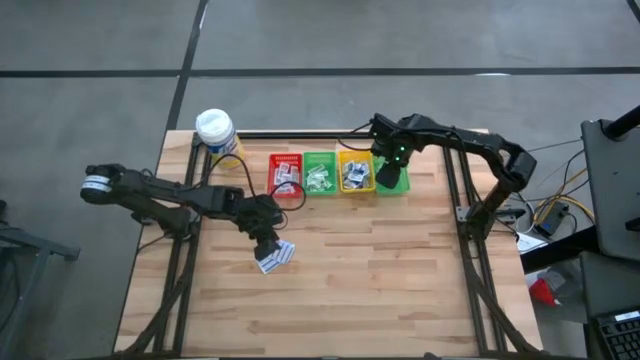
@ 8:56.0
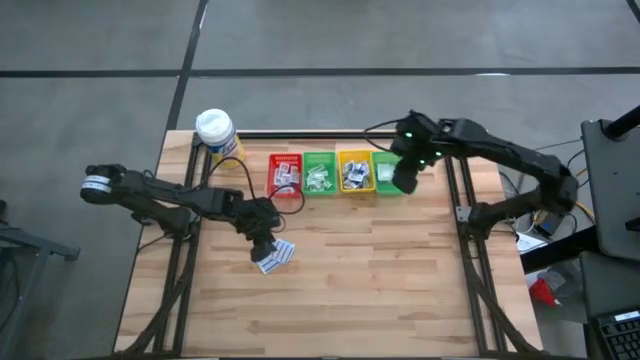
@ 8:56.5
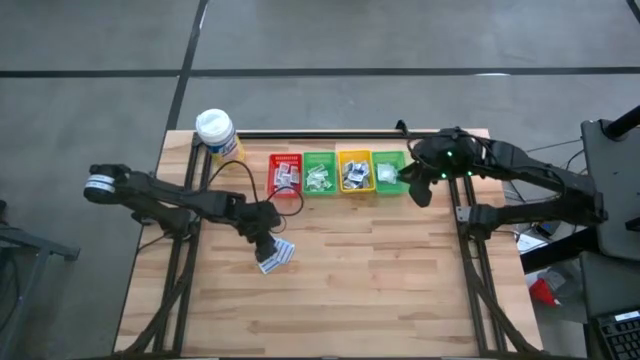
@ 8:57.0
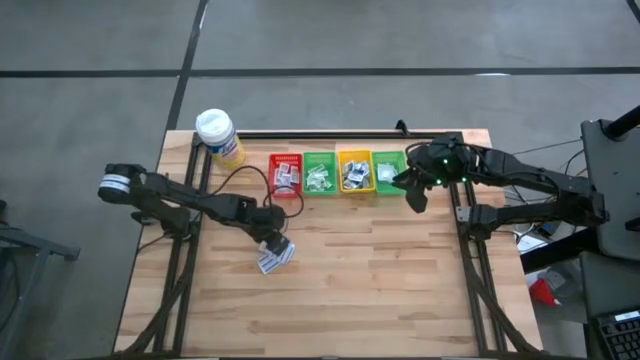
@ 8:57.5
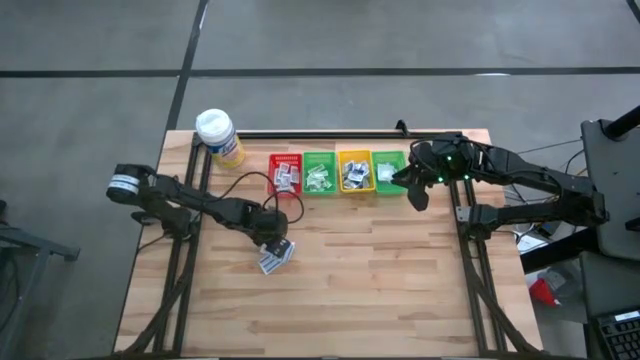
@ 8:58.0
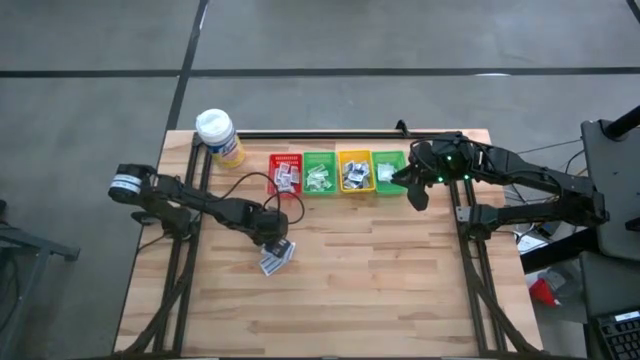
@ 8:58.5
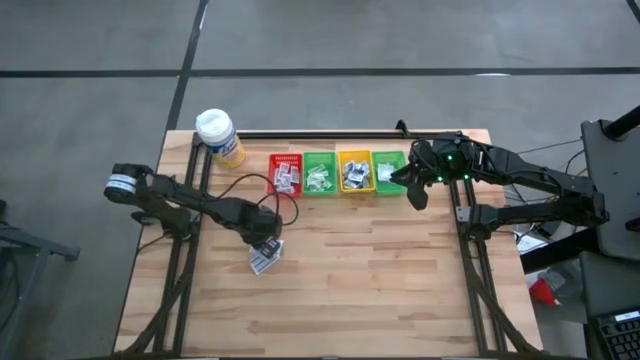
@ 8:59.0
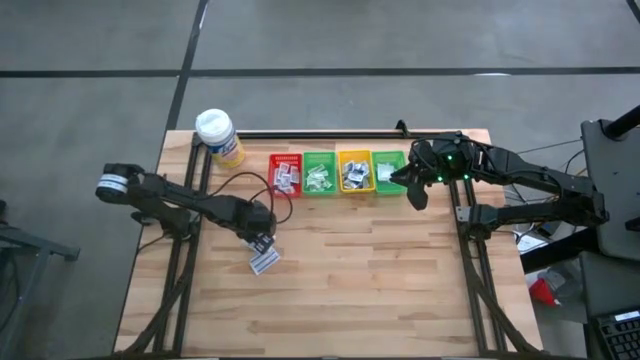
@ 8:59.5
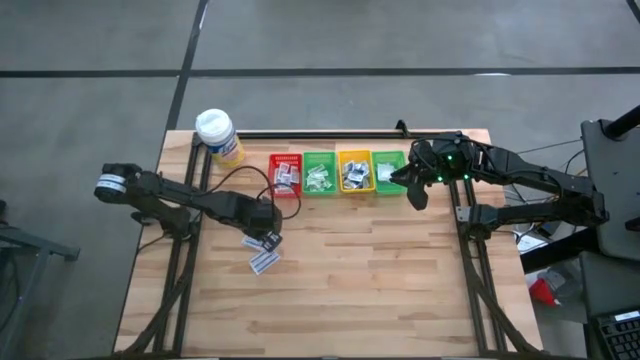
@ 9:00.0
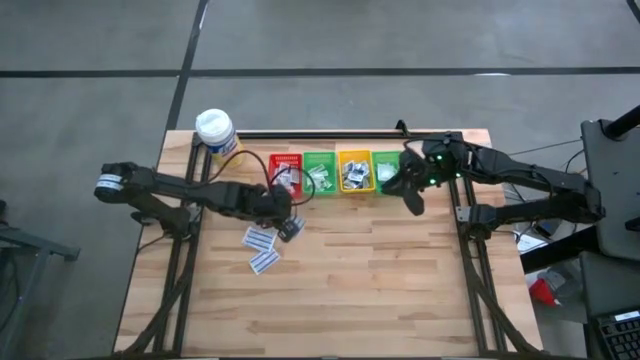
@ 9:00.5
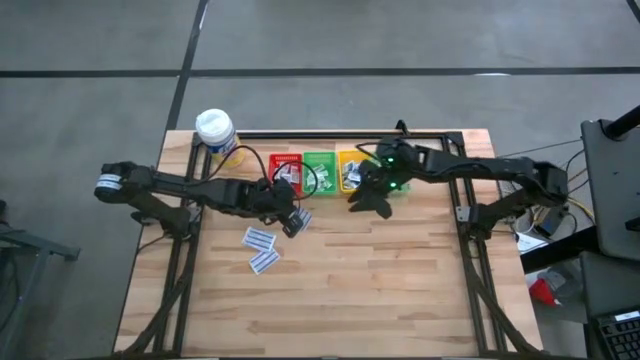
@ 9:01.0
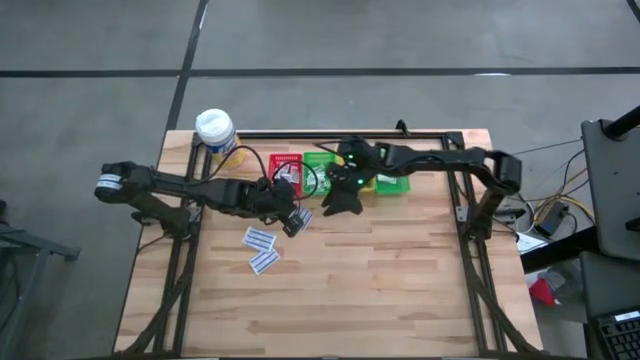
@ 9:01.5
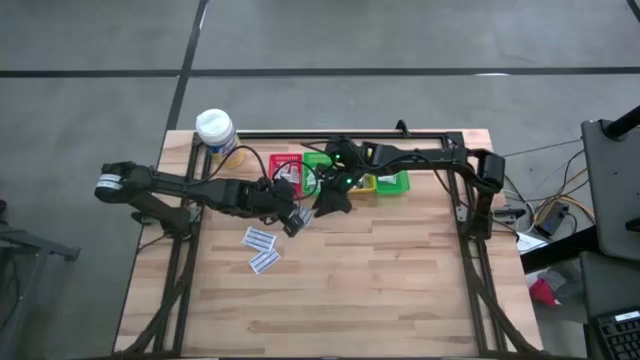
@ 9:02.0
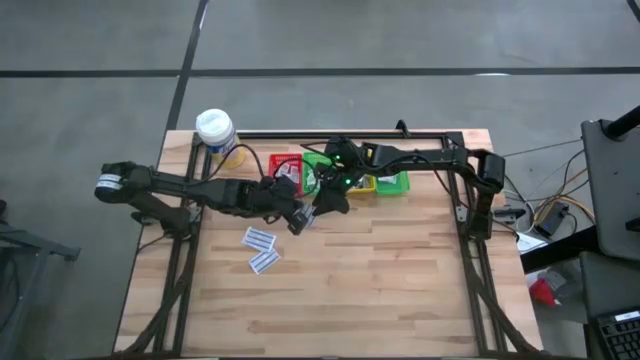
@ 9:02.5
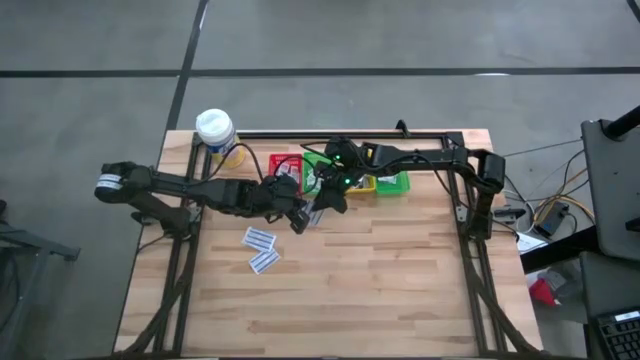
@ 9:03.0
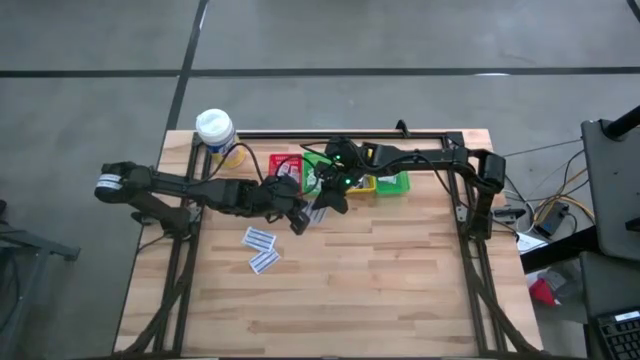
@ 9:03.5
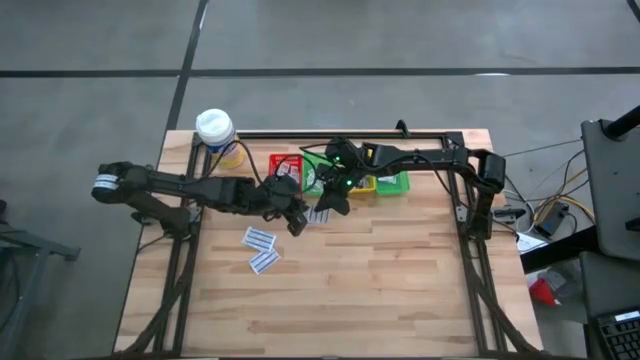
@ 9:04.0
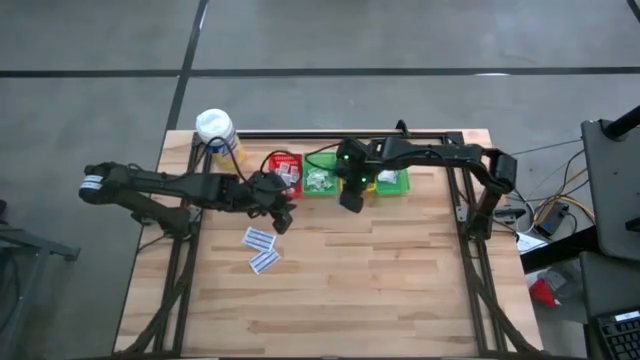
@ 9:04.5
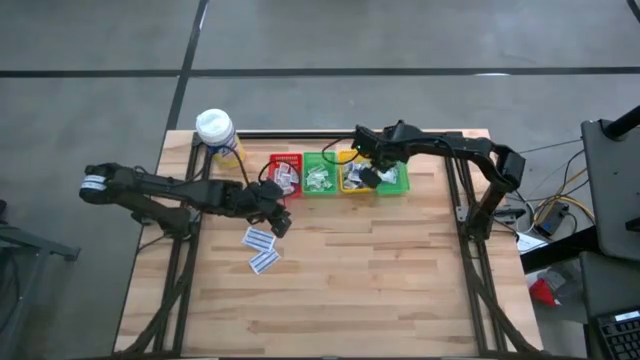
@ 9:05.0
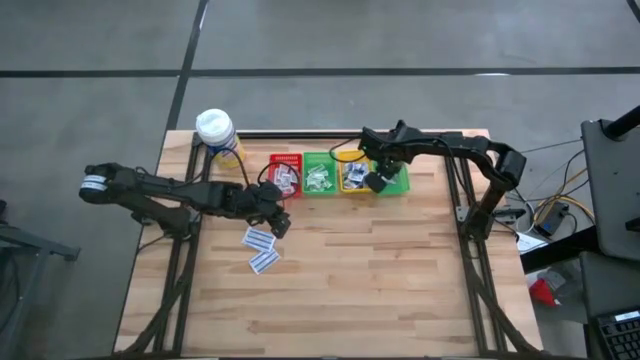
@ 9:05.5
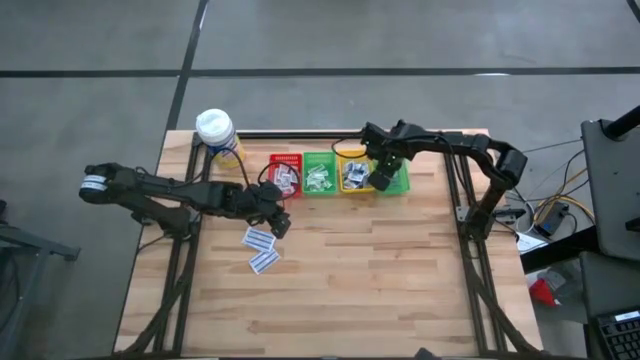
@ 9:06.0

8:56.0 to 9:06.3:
Task: Pick & Place First Aid Supplies
Put the blue fingertip bandage into the right green bin

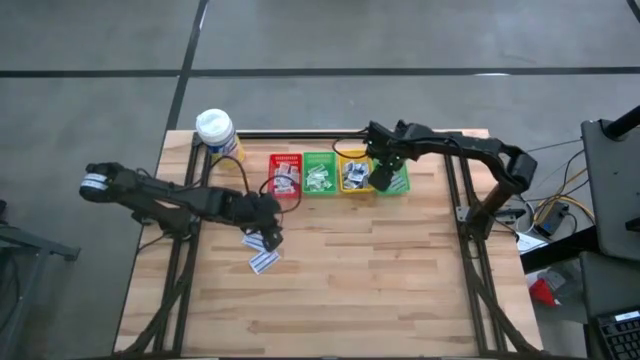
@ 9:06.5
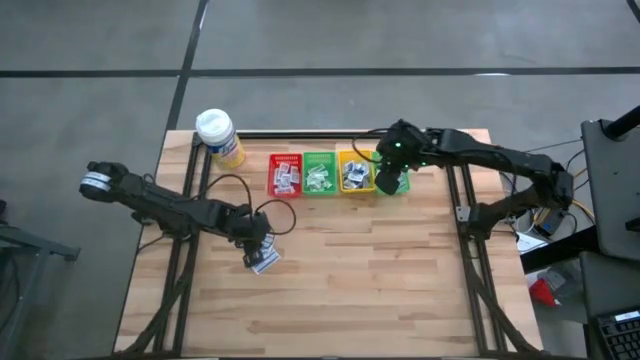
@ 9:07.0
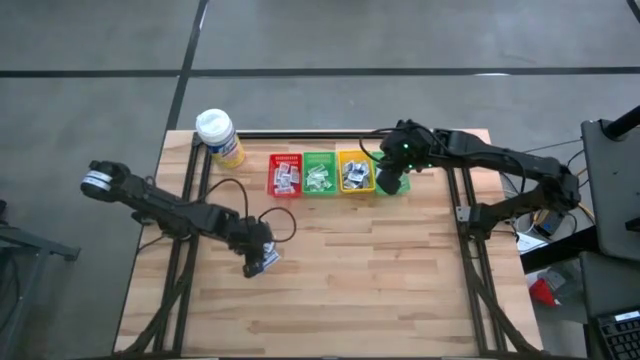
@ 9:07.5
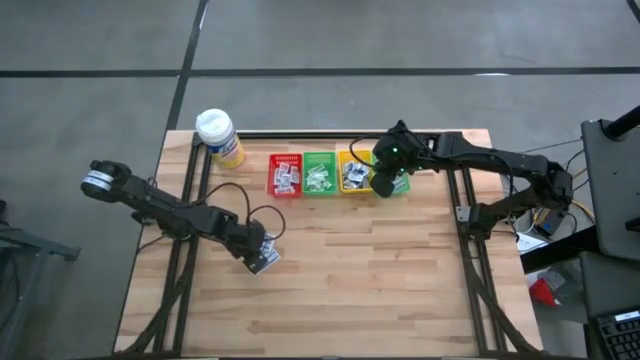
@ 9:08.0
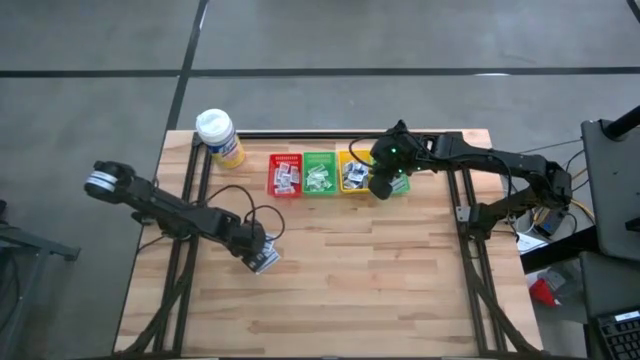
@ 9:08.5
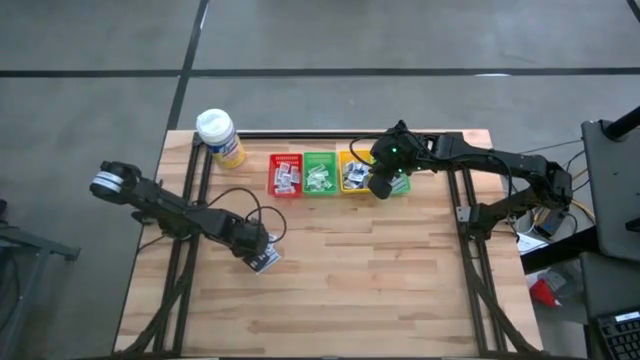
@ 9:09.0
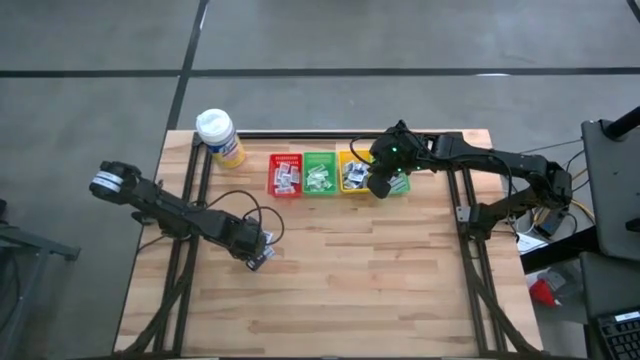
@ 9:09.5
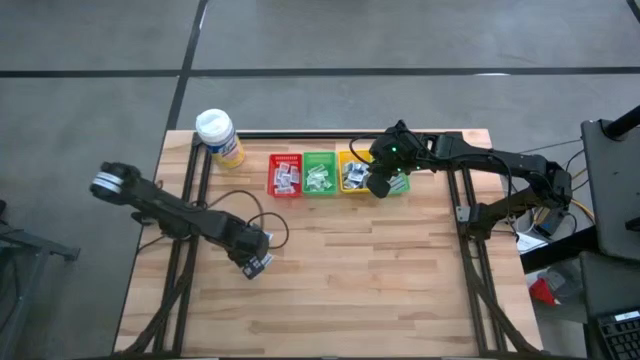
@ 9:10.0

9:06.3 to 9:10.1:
Put the blue fingertip bandage into the right green bin

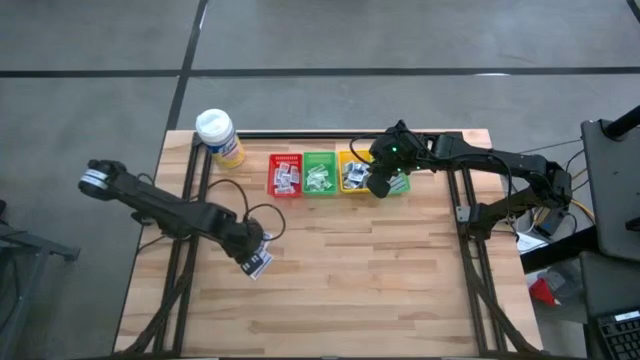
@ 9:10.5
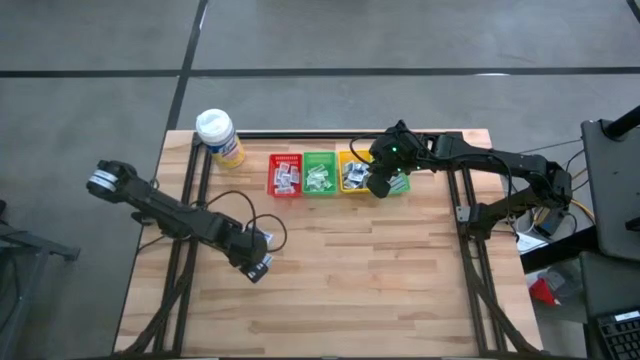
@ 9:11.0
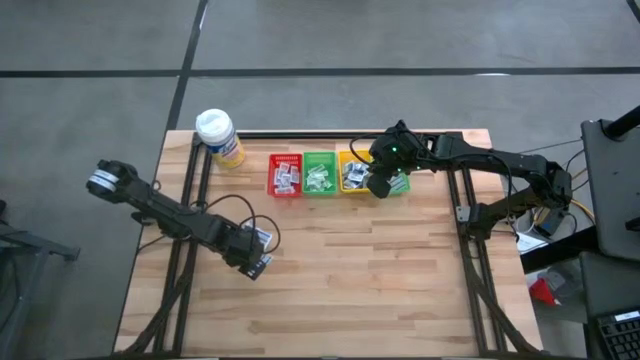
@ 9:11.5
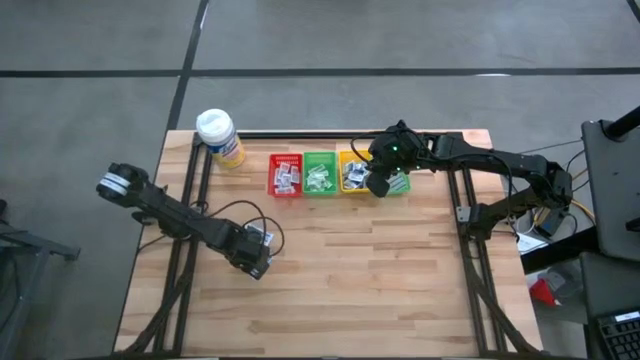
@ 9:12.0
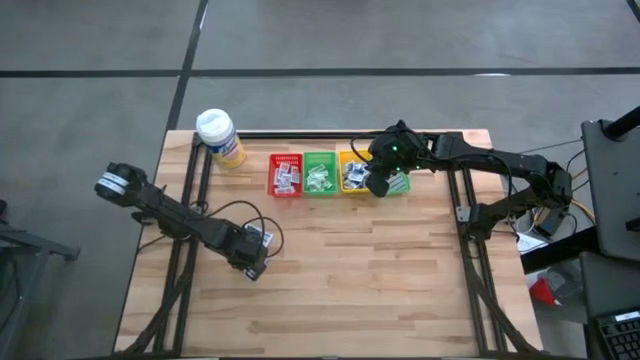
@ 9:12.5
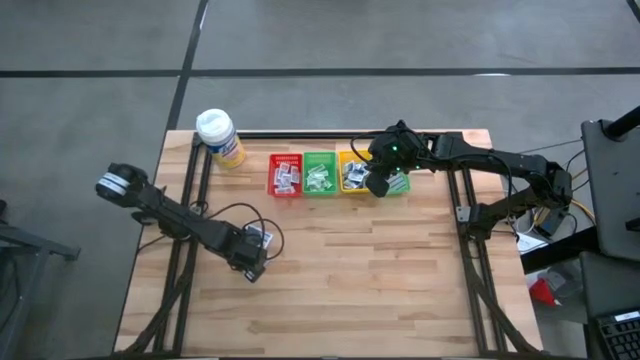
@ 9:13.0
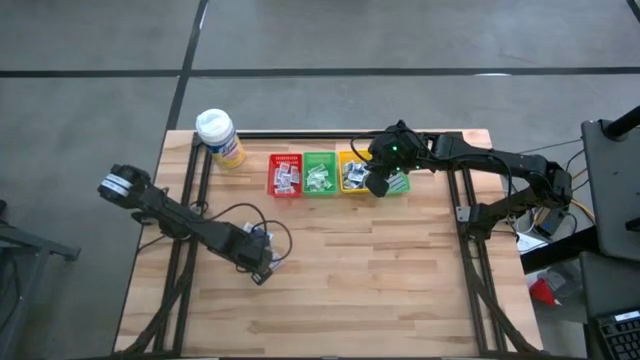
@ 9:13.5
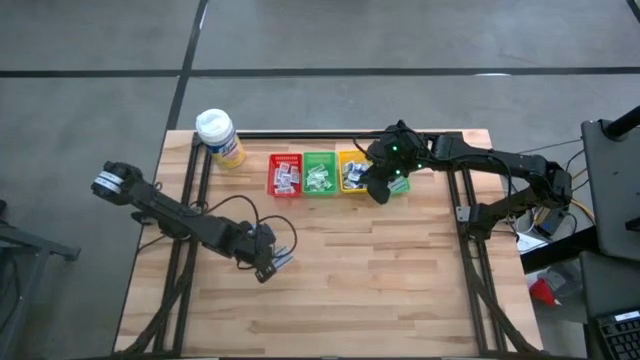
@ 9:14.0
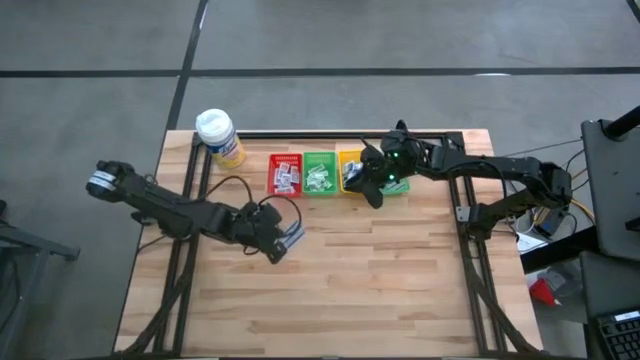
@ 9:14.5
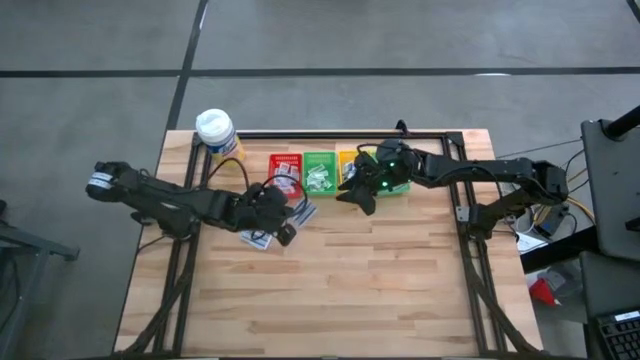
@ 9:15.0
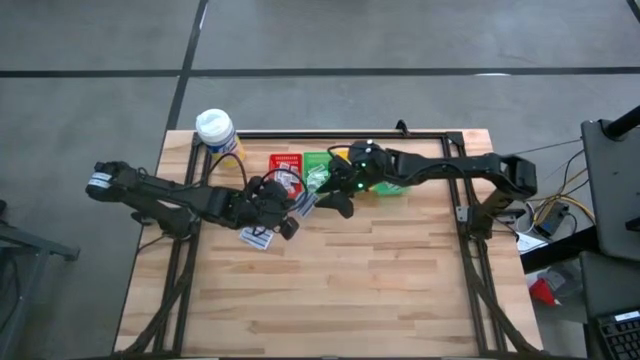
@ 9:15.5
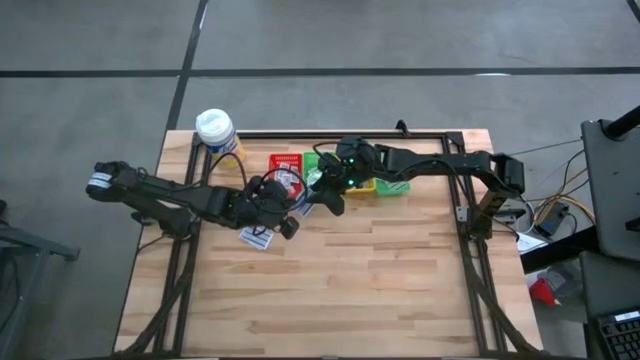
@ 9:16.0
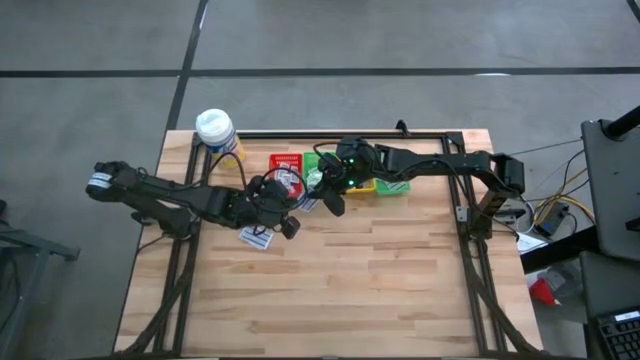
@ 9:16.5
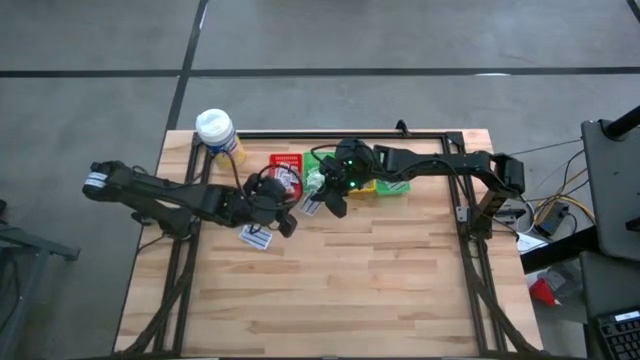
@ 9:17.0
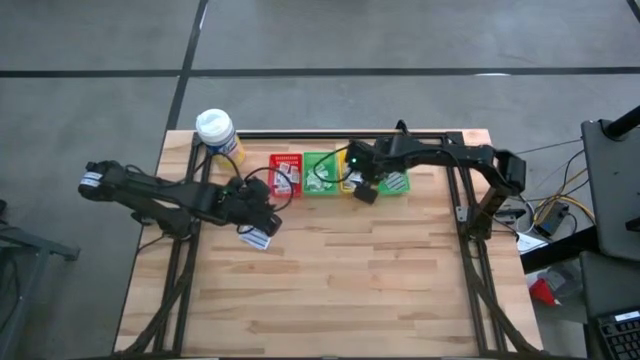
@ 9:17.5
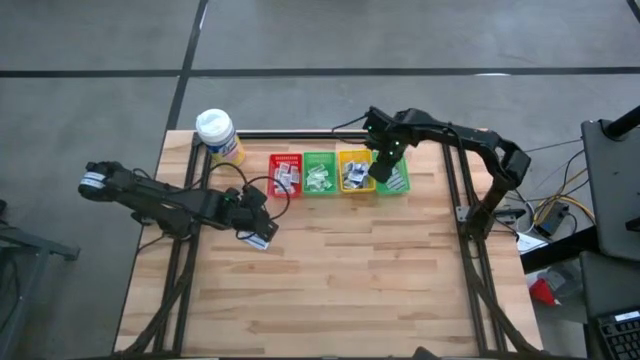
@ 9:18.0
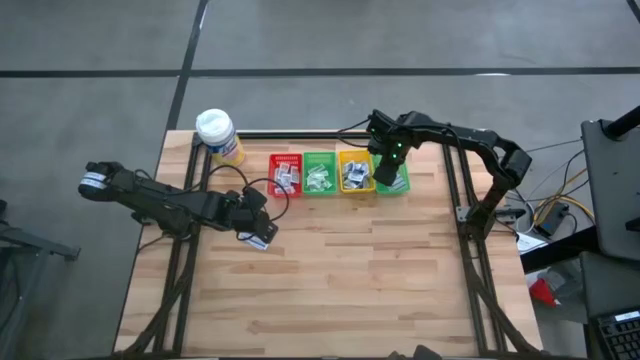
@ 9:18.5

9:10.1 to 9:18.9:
Put the blue fingertip bandage into the right green bin
